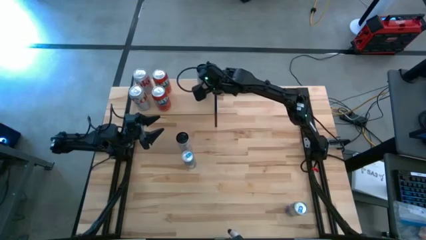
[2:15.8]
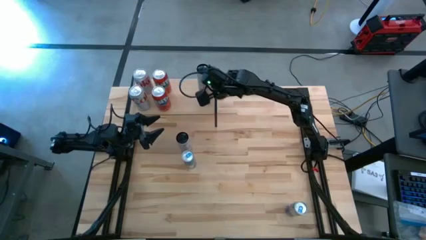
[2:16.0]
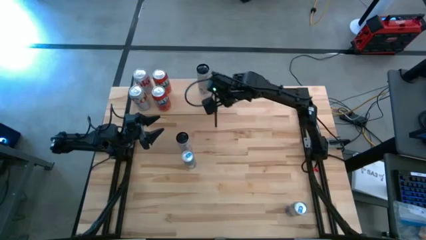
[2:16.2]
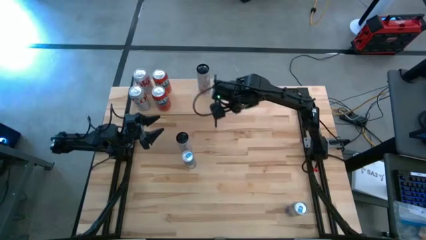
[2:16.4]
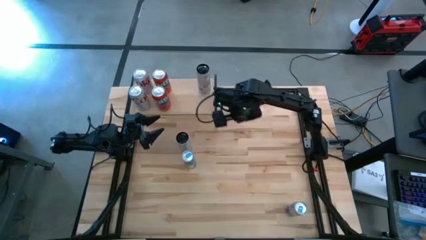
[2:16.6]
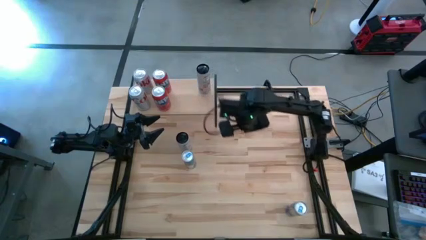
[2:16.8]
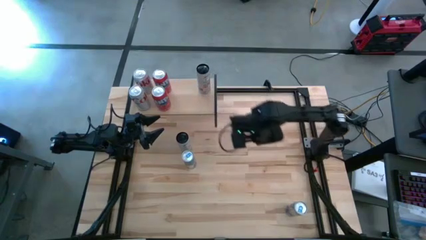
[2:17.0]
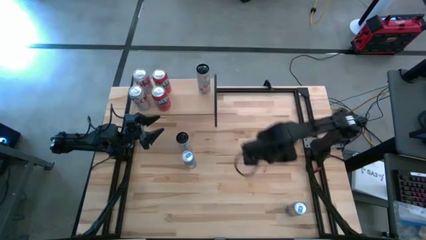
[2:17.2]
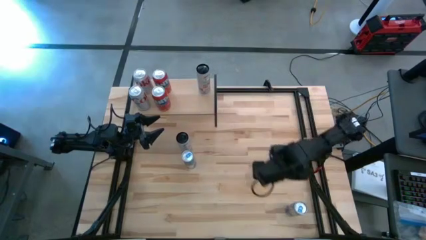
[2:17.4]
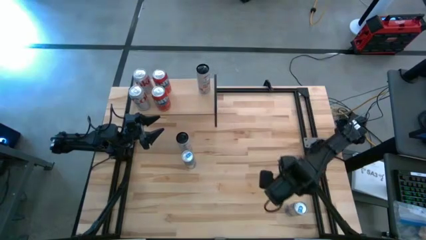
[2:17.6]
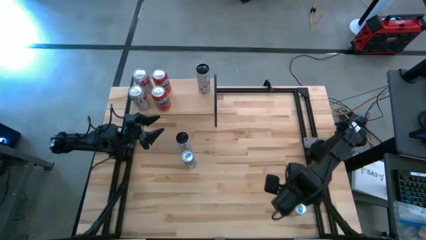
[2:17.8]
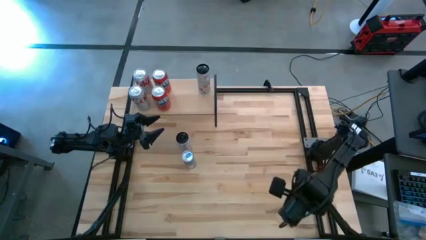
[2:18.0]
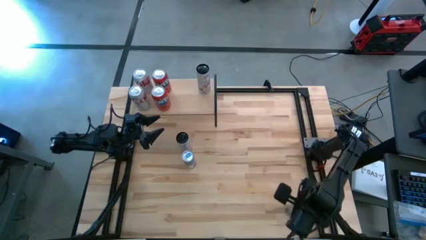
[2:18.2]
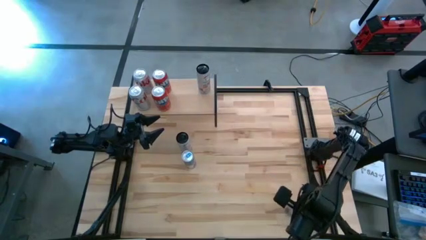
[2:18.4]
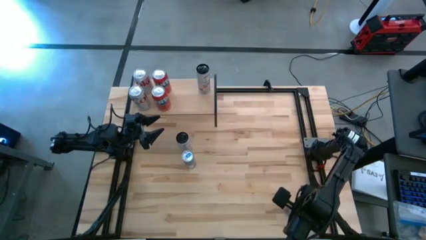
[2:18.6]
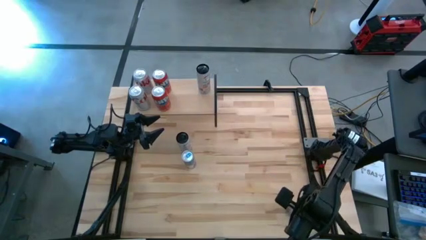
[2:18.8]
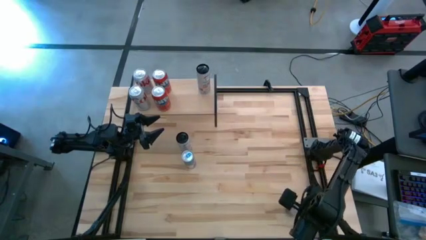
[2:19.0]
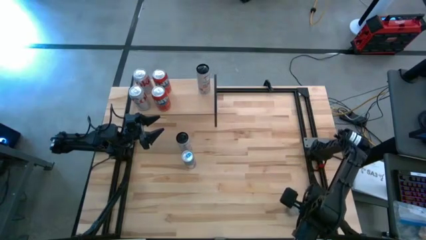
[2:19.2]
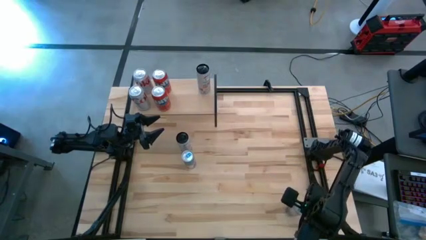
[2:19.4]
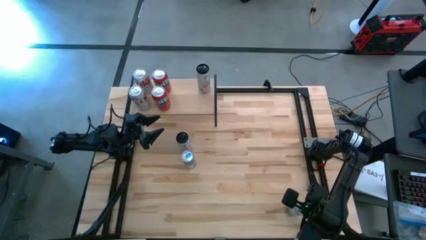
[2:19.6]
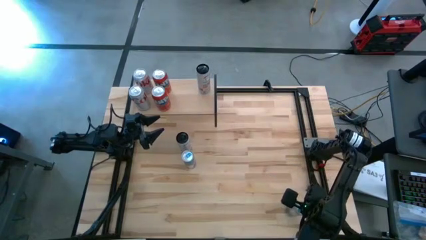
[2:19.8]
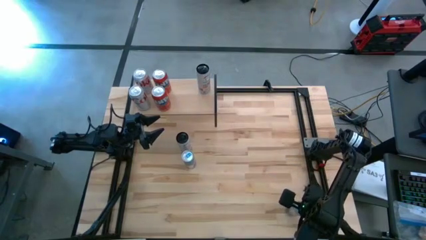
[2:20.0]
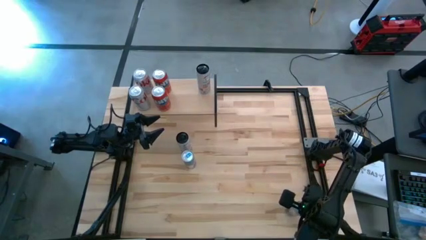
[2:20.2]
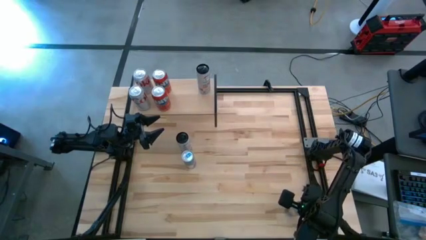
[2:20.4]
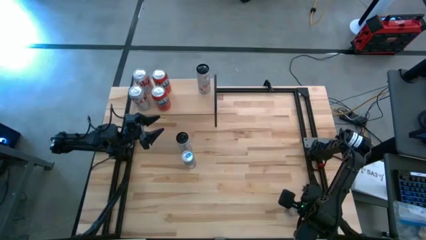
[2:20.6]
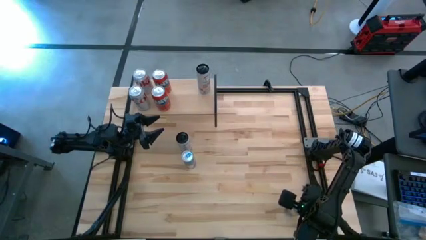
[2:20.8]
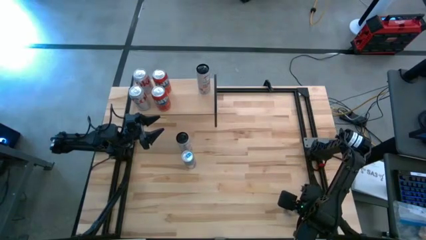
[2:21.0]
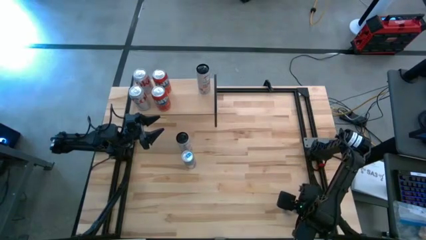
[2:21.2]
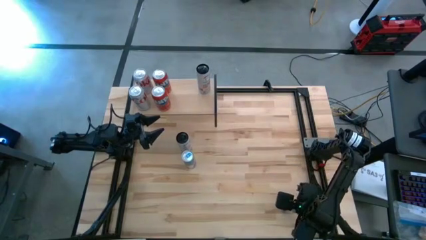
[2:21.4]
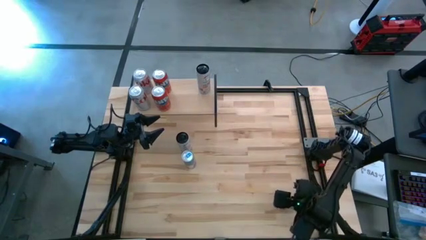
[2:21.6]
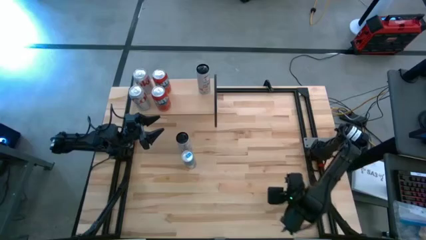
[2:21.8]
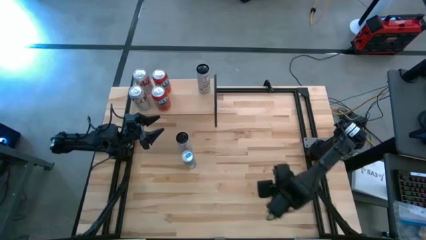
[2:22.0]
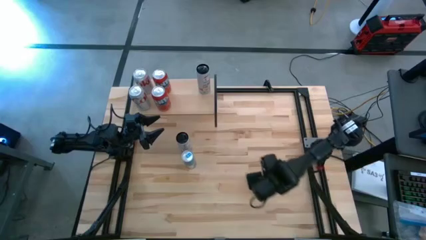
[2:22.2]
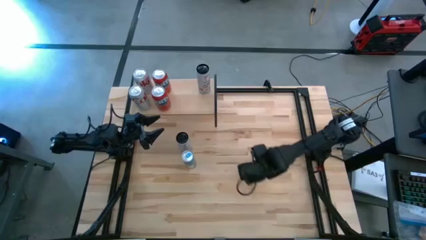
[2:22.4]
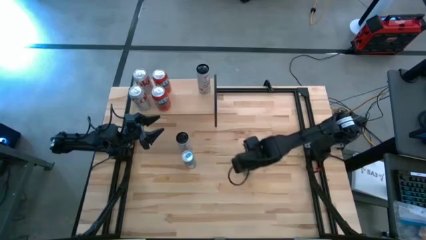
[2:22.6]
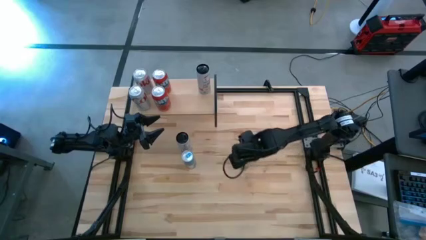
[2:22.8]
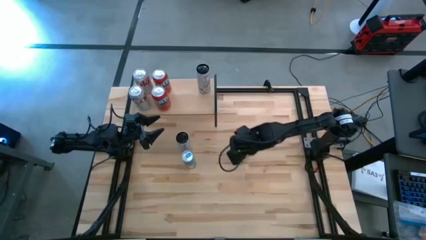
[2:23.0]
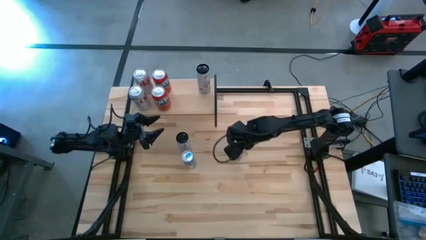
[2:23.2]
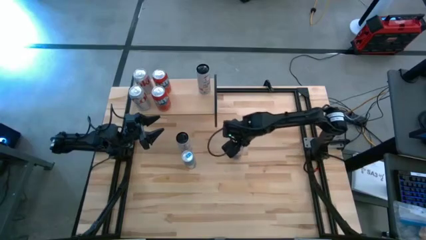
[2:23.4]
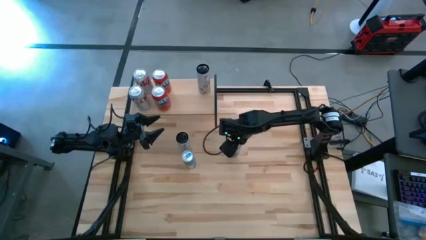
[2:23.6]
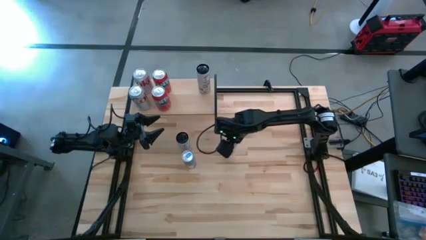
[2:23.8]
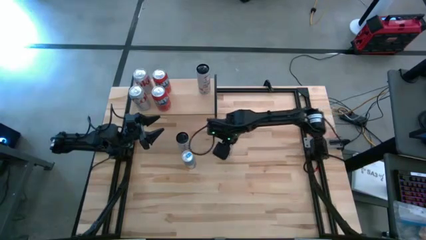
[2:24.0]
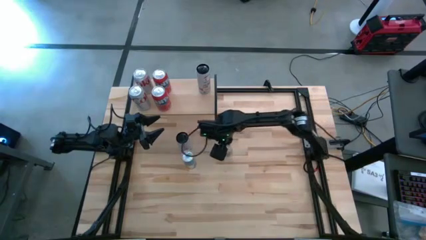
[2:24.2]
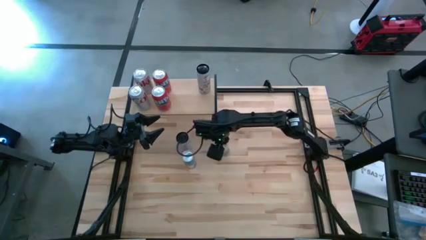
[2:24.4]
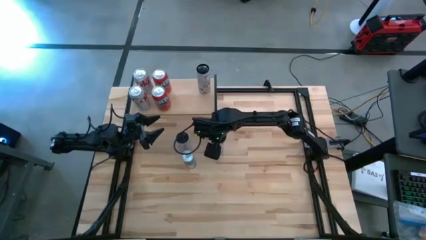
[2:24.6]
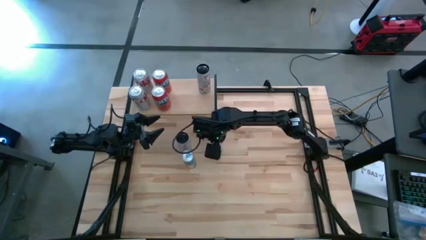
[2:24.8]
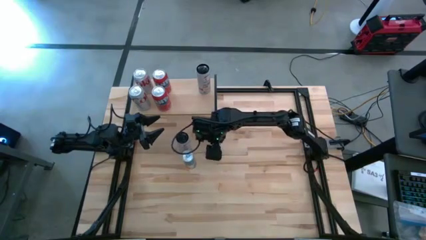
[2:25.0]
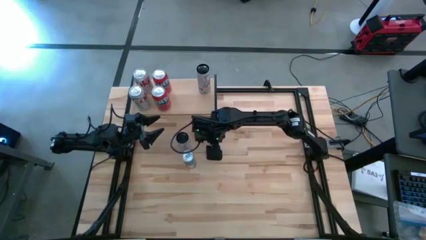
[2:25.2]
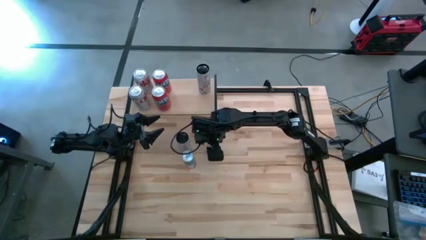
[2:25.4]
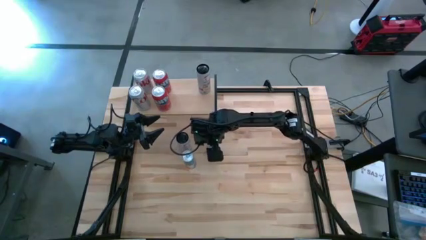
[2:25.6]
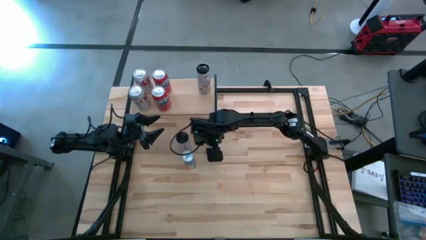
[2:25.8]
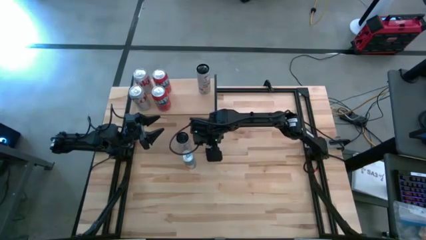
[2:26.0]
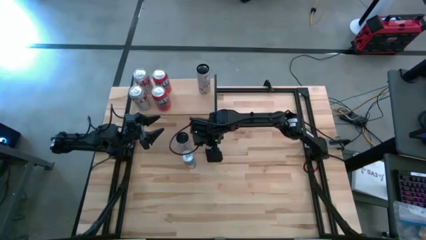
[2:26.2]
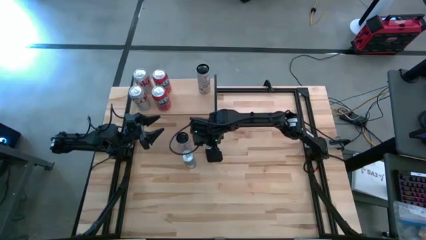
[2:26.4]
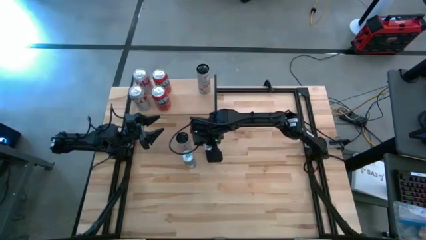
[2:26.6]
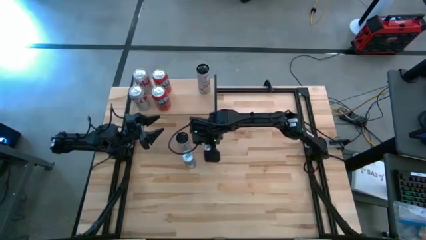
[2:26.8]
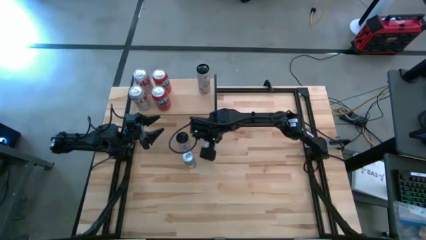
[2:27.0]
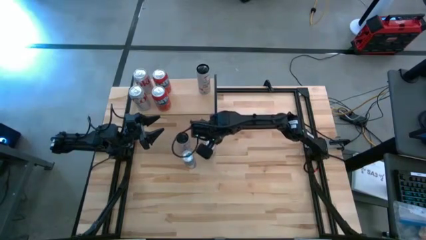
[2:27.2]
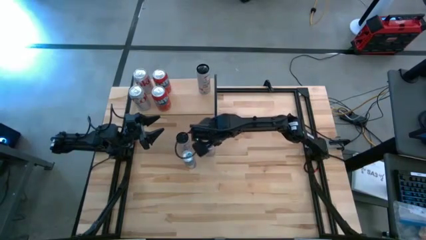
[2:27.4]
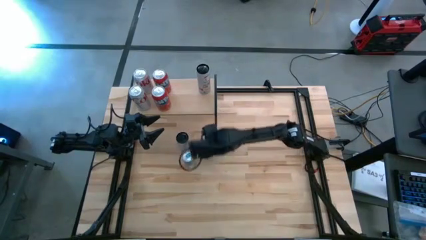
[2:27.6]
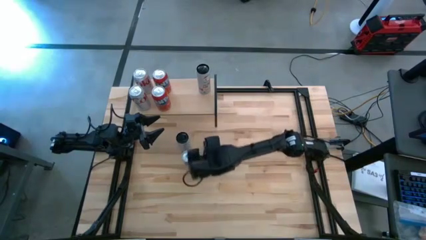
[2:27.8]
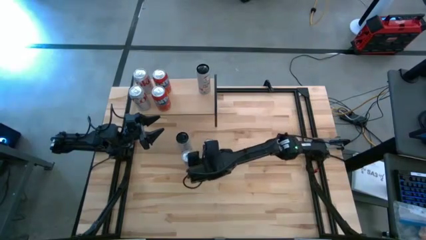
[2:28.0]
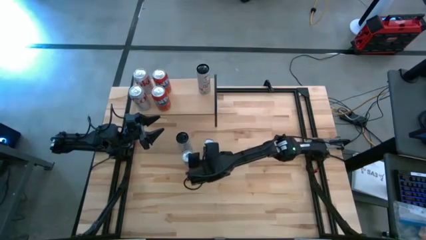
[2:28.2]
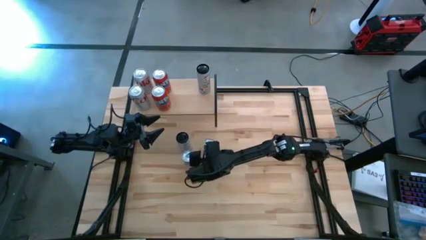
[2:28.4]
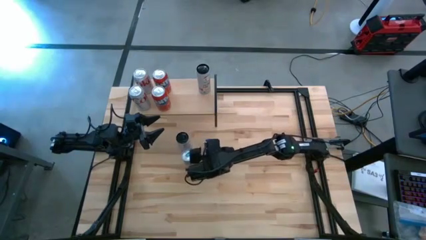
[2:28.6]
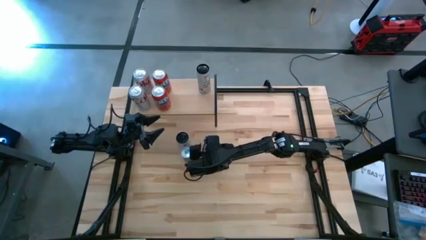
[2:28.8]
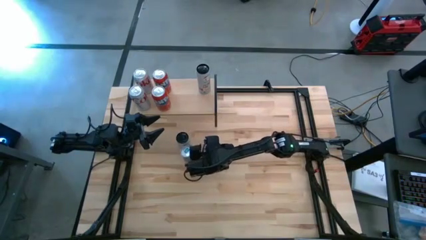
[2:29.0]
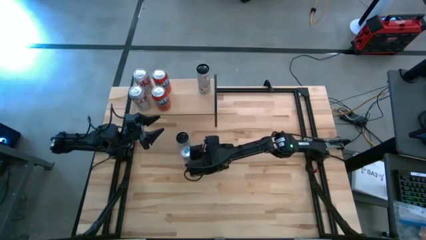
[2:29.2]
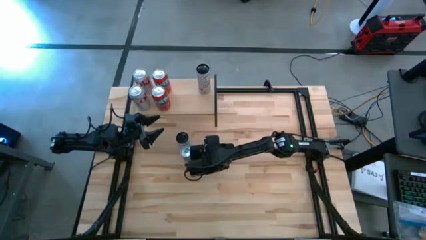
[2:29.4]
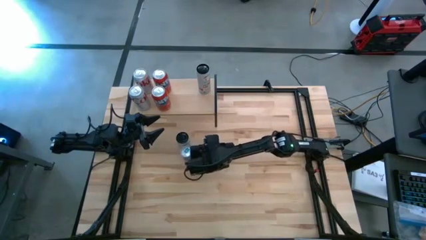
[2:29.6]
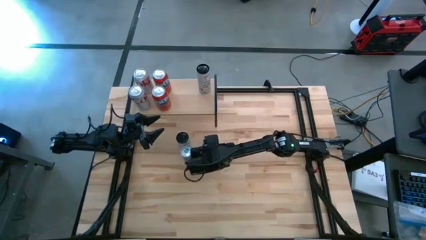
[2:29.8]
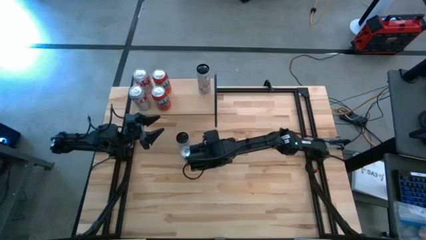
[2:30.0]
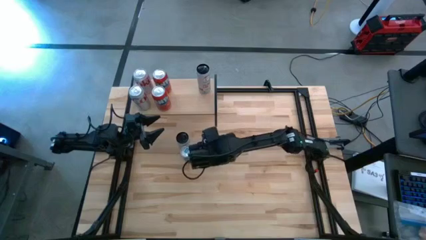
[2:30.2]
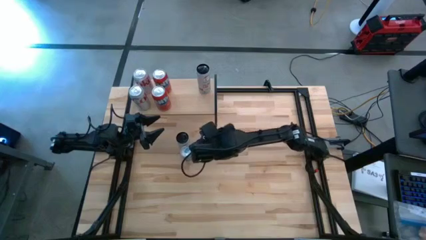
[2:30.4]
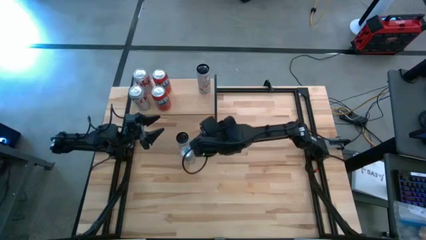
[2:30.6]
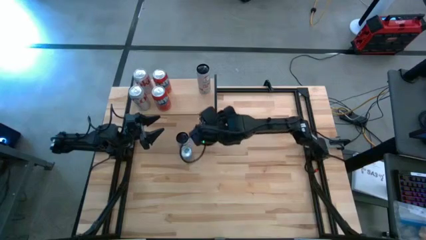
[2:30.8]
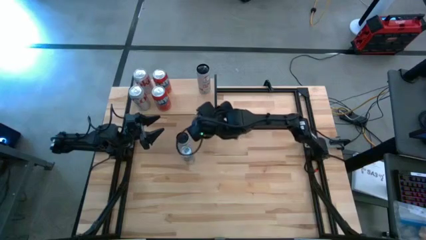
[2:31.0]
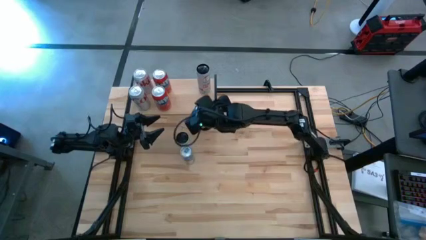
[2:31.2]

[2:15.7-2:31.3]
Task: Place canned beverage on shelf
Put the bottom blue soda can on the shelf
